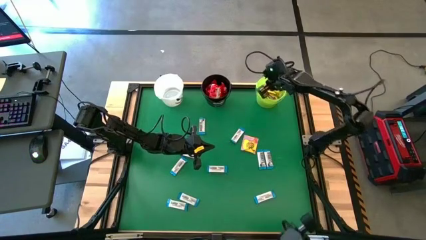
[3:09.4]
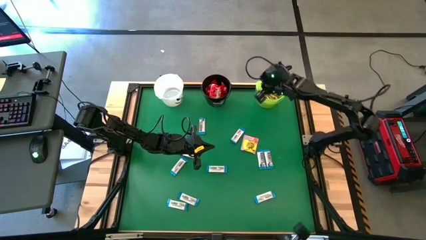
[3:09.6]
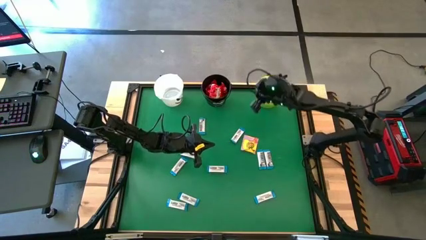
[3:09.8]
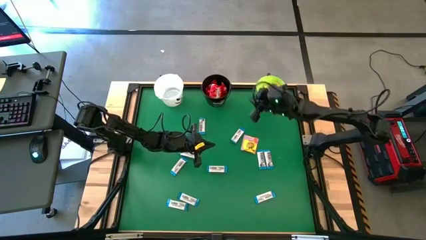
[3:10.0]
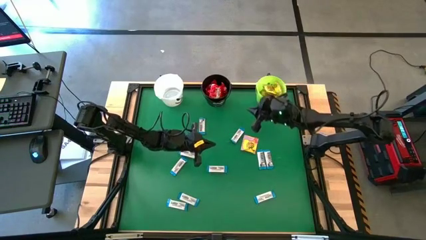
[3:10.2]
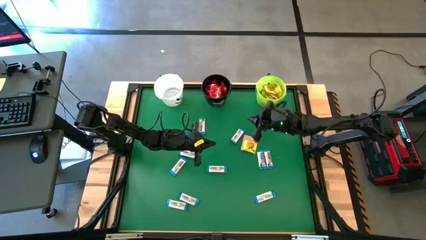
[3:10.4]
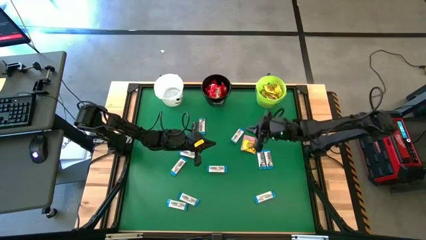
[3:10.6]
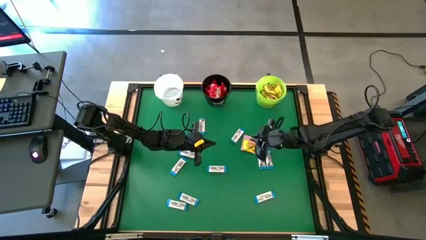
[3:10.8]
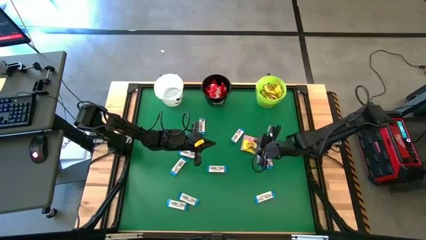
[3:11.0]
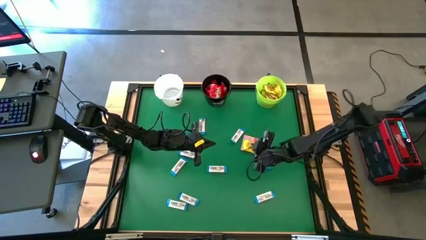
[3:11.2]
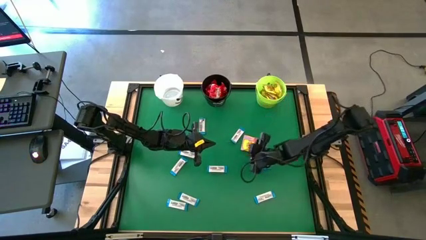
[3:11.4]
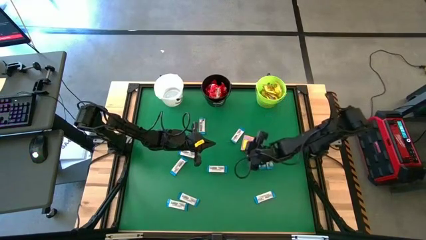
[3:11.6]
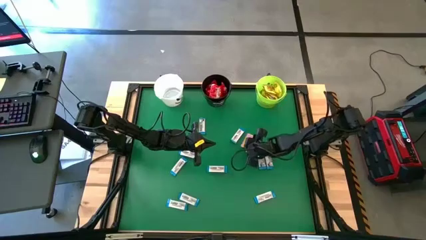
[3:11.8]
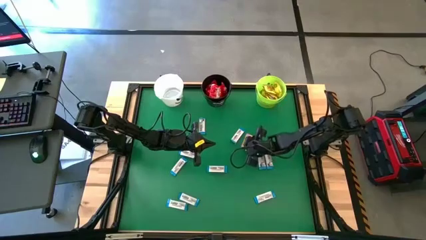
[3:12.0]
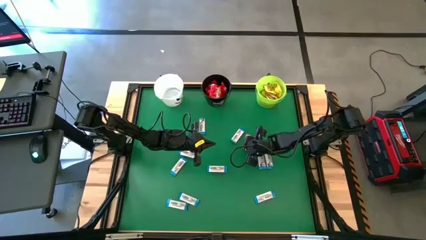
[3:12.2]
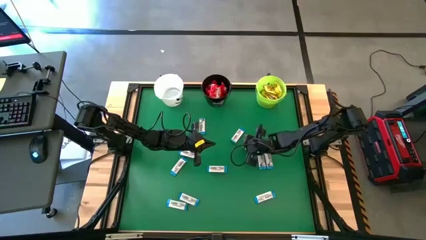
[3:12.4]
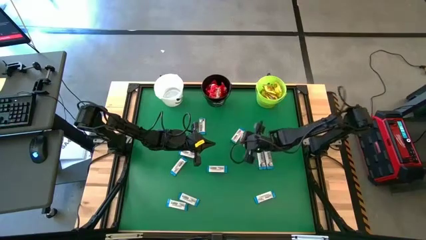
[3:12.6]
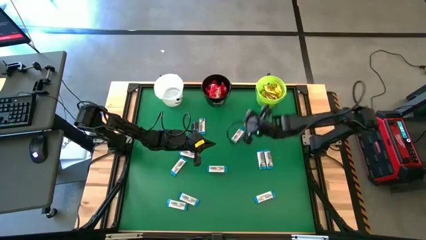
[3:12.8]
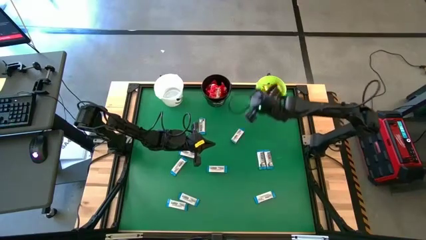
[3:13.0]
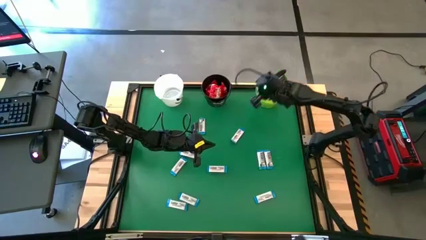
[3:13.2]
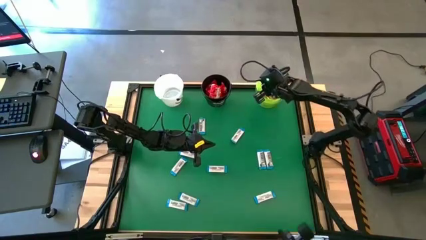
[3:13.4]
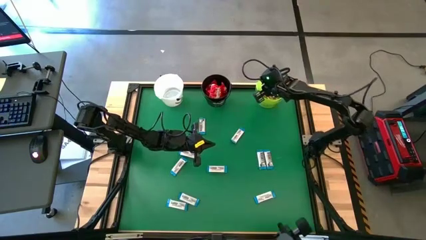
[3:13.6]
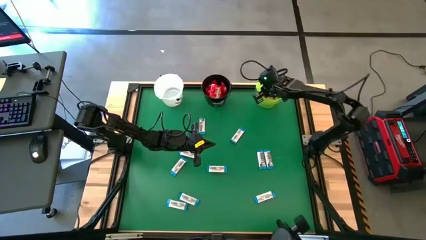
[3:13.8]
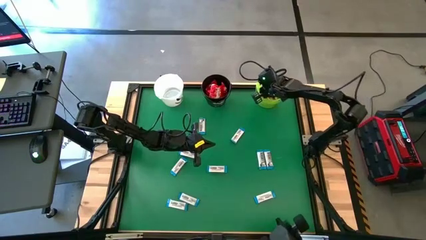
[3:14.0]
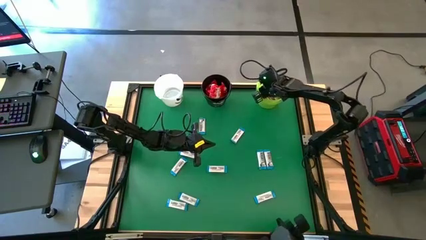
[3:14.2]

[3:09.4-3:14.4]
Task: Sort candy by brand, put in halloween buckets
Put the yellow candy into the green bucket

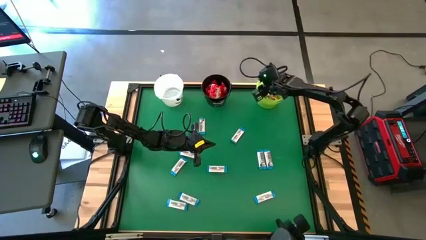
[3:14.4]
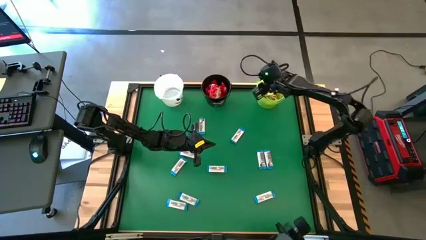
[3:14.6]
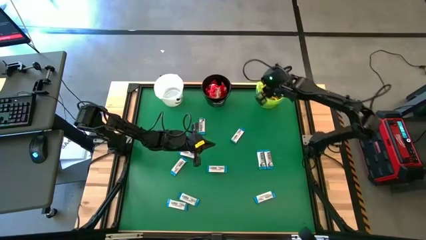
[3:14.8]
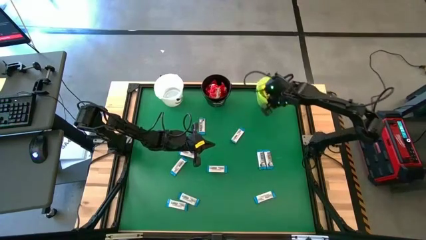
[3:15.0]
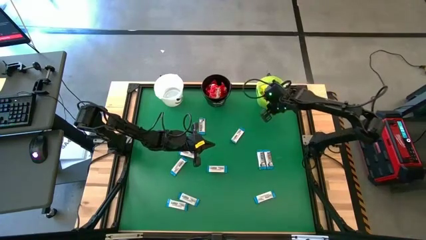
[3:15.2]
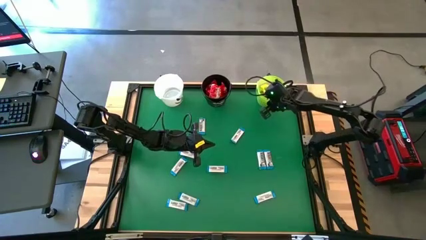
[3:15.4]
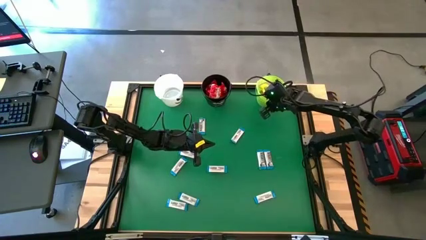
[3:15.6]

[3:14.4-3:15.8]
Adjust the green bucket

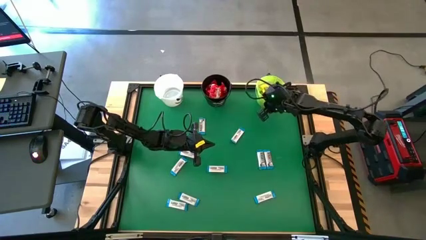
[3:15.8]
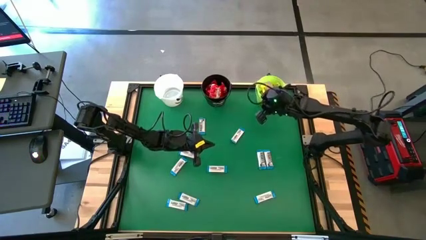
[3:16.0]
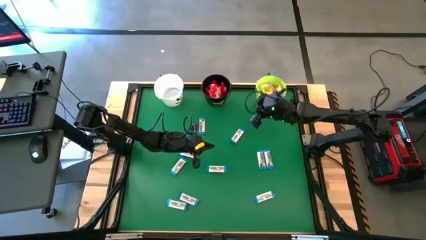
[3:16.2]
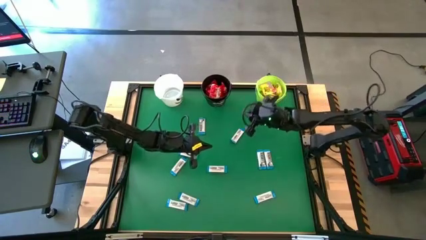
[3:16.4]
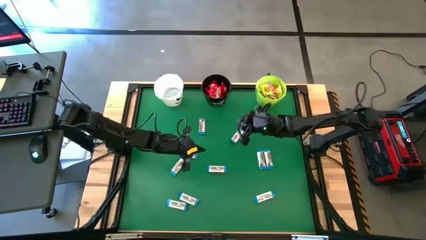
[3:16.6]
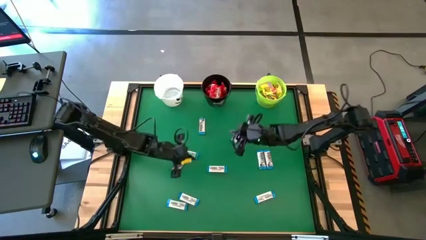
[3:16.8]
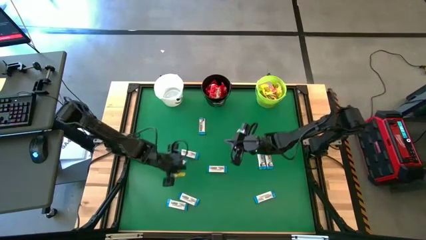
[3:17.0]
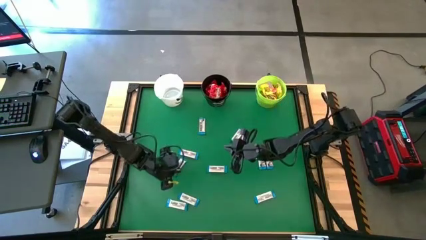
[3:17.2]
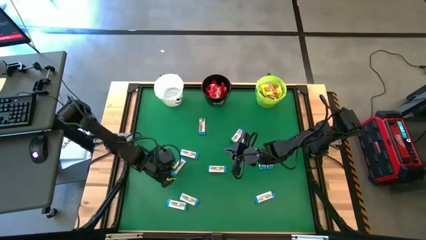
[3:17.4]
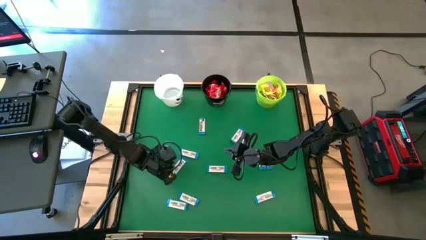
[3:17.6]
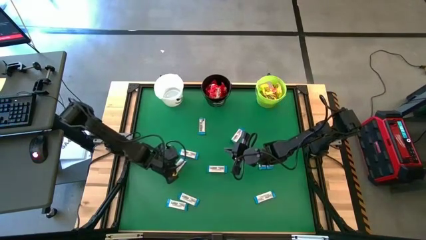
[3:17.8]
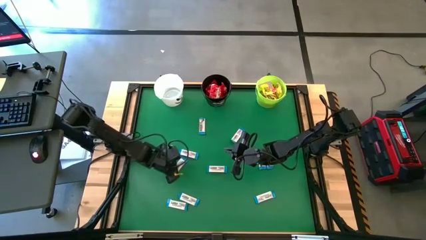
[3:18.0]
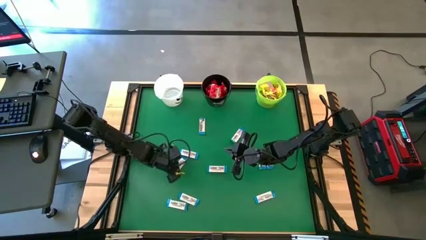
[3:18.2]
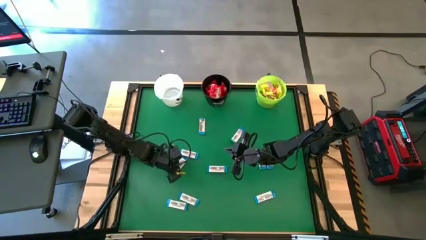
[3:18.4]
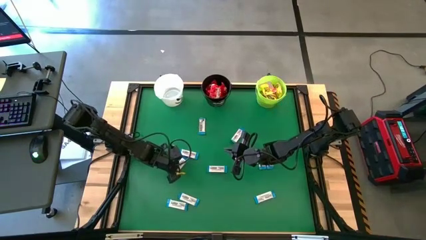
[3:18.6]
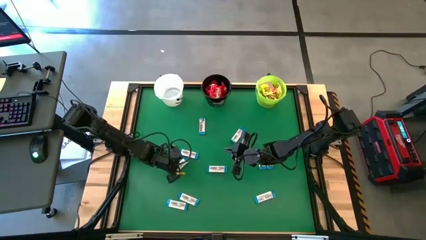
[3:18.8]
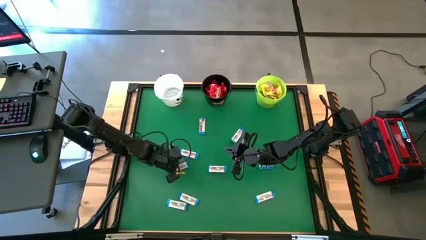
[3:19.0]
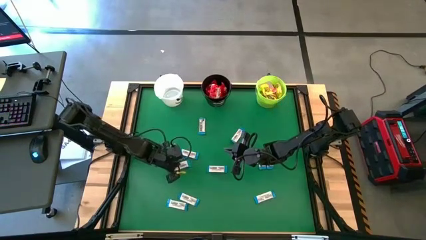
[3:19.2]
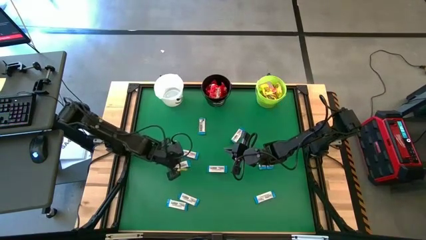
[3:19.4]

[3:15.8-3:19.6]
Put the white chocolate bar into the white bucket

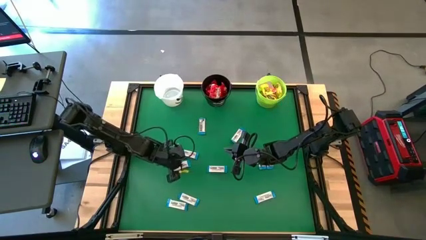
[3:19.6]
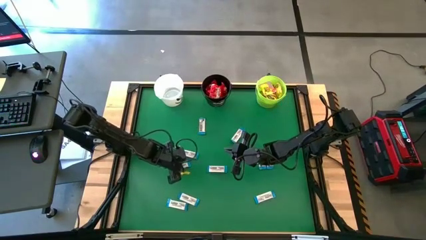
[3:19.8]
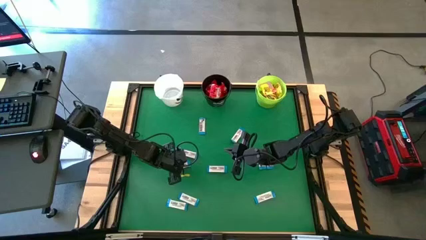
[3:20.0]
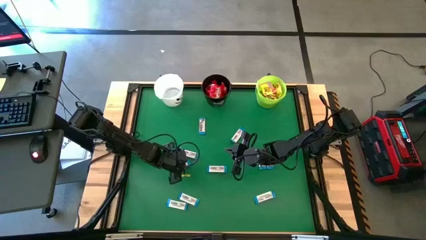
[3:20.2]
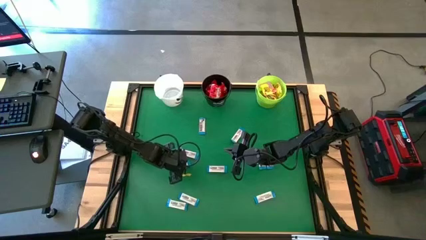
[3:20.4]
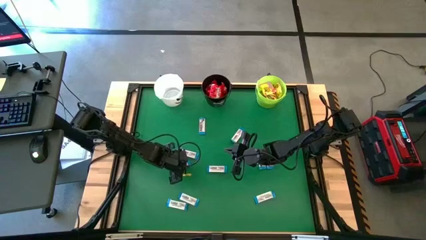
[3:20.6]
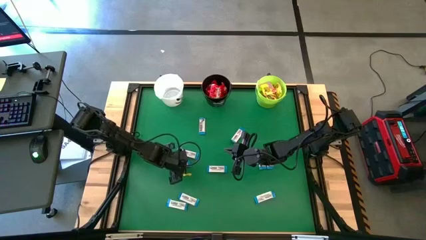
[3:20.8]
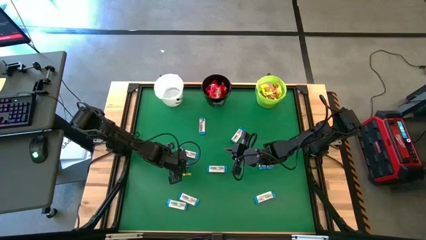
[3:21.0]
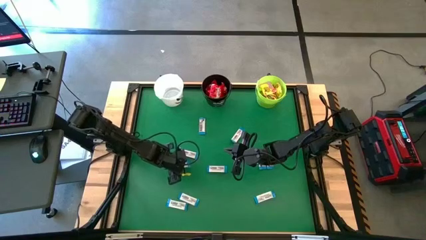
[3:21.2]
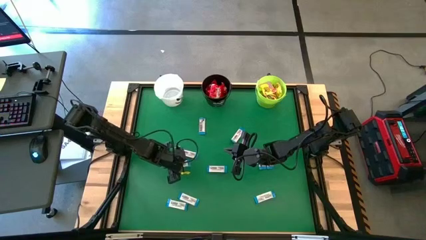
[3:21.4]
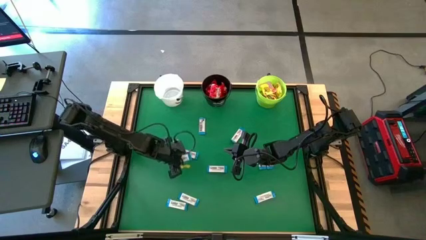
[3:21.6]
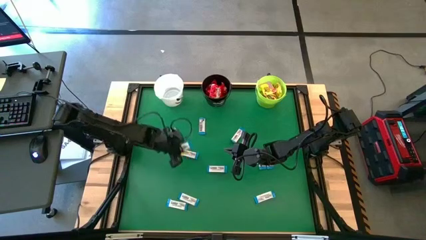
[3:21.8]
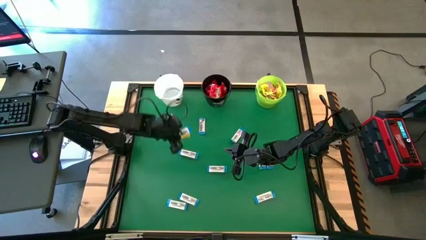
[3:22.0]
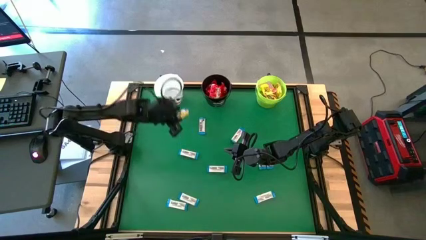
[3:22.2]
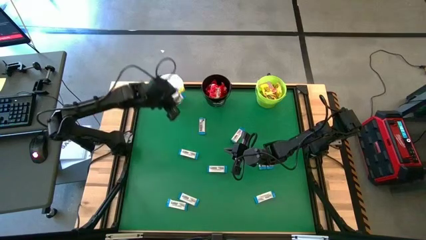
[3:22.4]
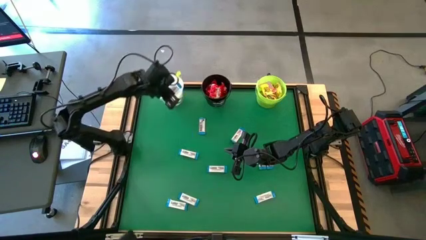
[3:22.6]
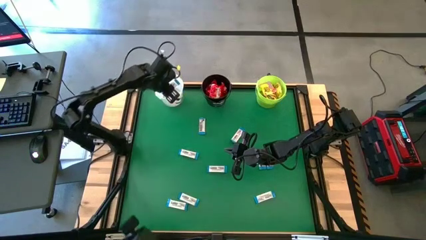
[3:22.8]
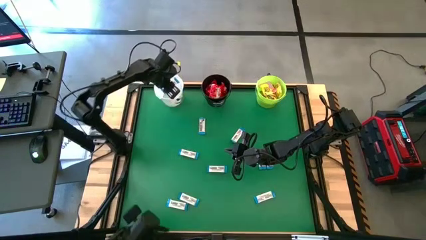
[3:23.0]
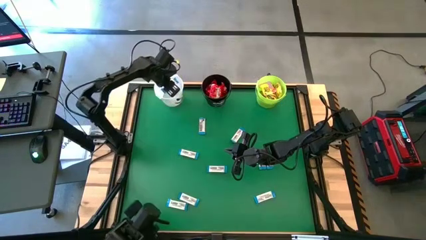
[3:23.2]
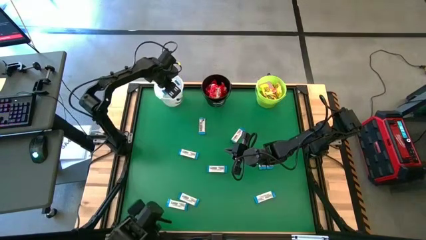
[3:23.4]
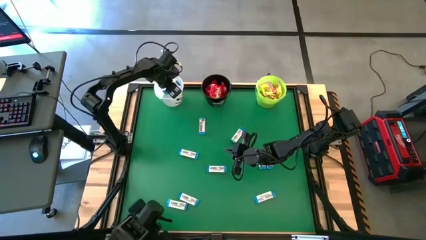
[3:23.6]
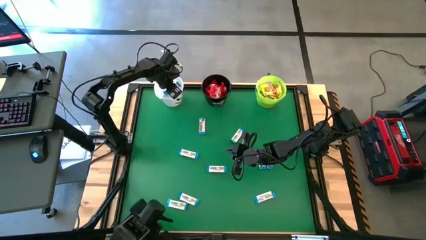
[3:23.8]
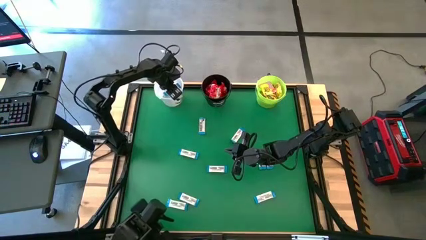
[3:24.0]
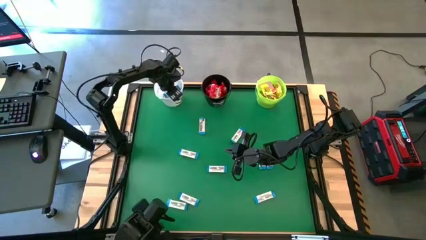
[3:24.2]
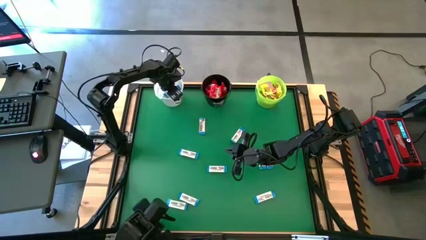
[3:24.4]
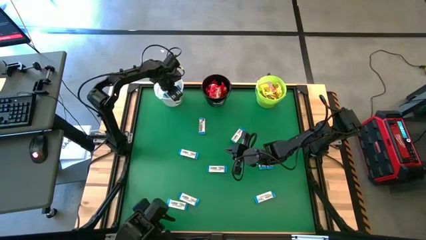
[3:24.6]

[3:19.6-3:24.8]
Put the white candy into the white plastic bucket

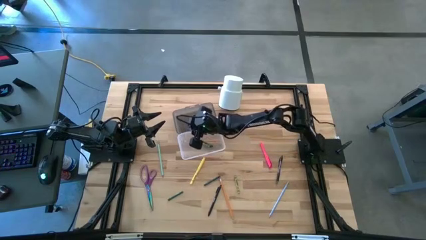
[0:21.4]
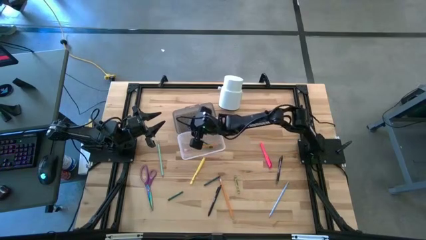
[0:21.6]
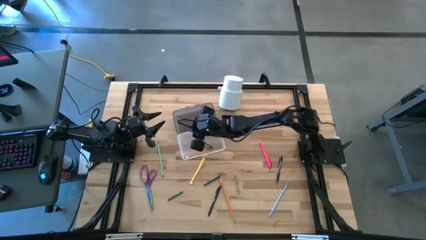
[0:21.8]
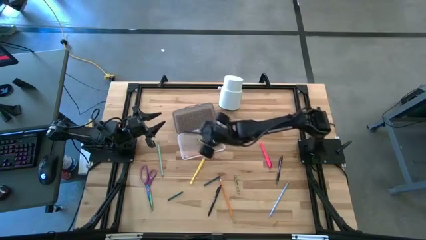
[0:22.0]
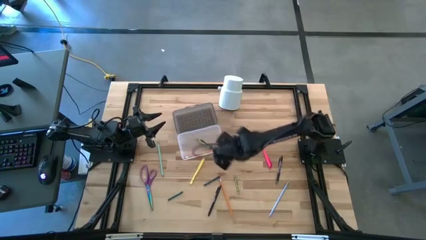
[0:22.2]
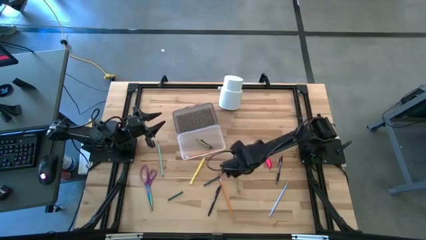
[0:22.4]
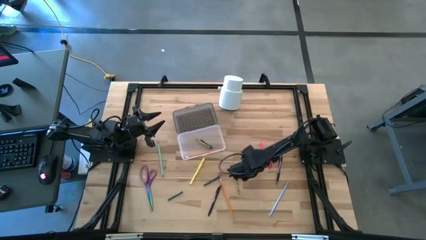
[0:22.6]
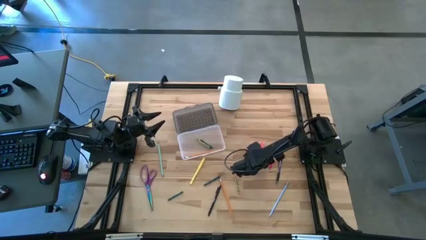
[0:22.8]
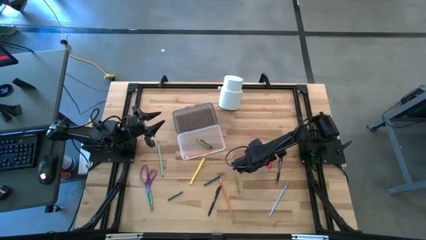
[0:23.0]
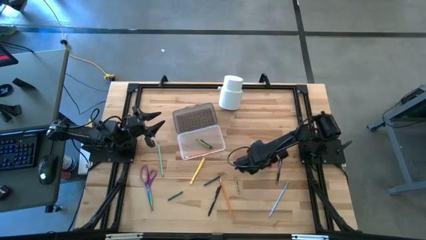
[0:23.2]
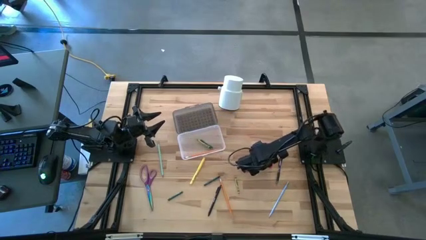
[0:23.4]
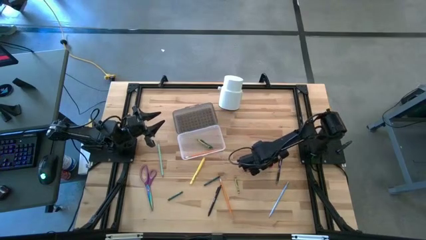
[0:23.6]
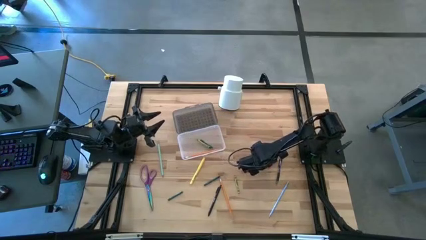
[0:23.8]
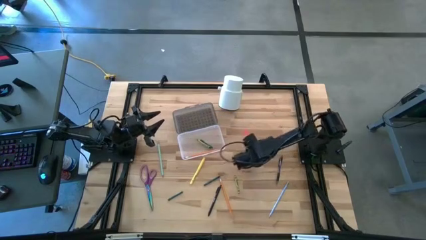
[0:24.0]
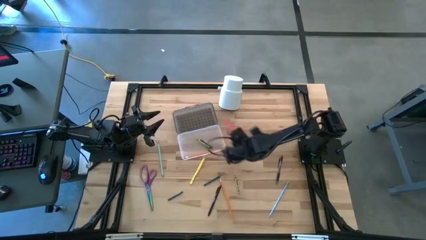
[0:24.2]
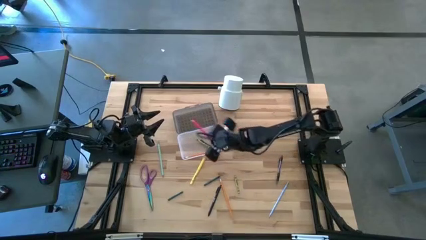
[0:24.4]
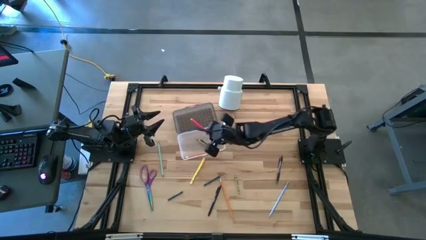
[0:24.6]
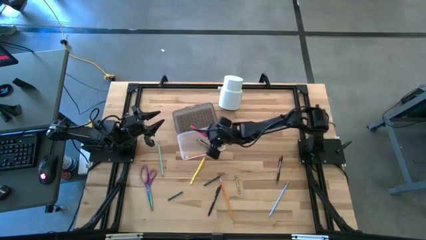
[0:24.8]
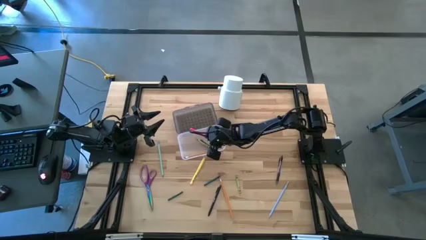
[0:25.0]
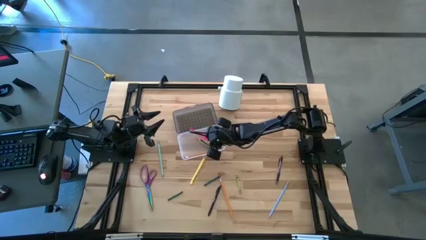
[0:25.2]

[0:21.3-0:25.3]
Task: Pick & place school supplies into a supply box
Put the pink pen into the black supply box
